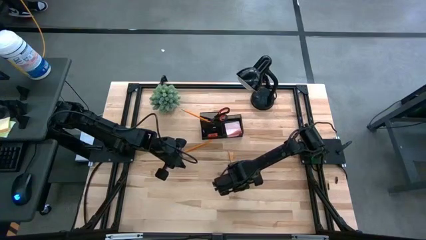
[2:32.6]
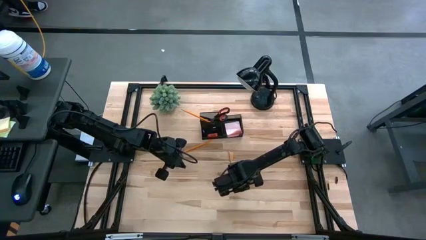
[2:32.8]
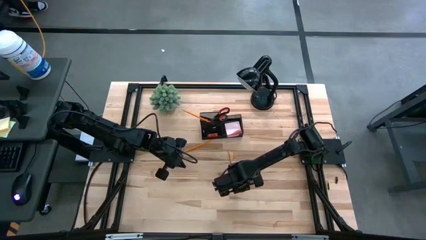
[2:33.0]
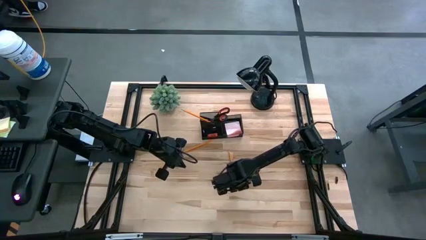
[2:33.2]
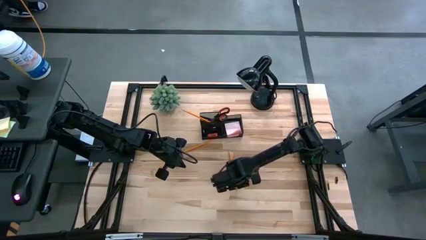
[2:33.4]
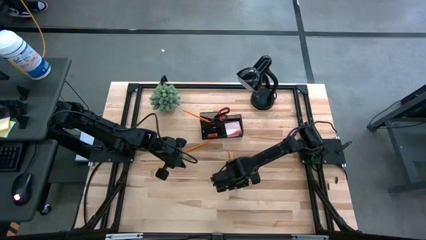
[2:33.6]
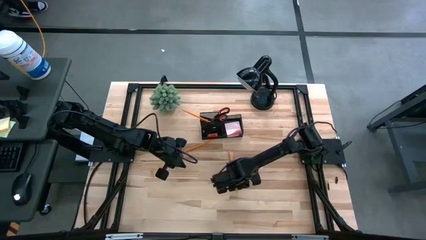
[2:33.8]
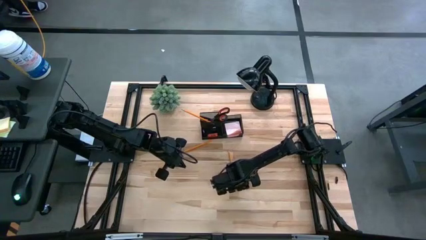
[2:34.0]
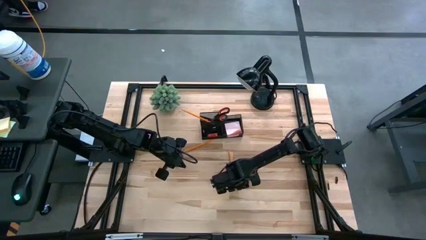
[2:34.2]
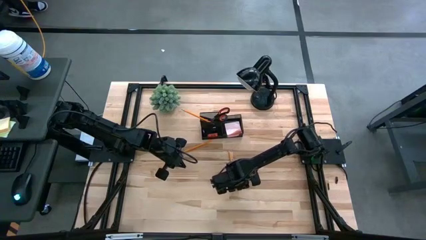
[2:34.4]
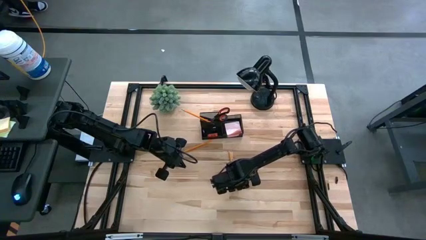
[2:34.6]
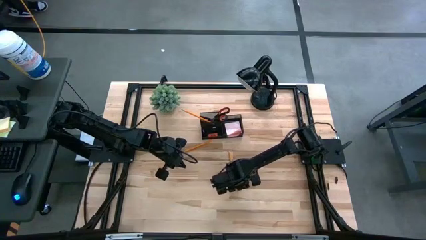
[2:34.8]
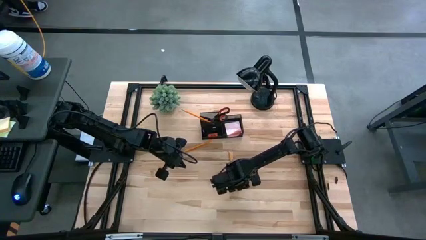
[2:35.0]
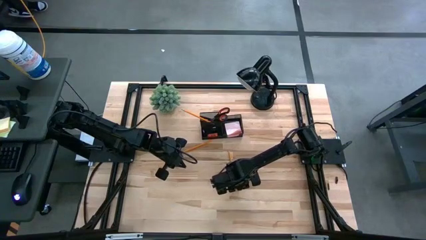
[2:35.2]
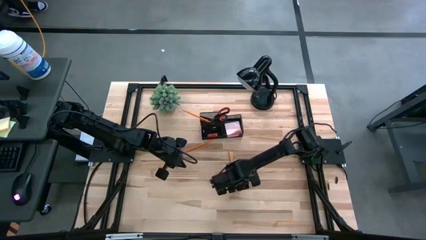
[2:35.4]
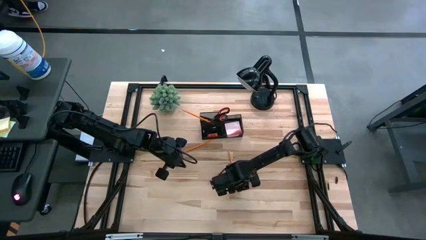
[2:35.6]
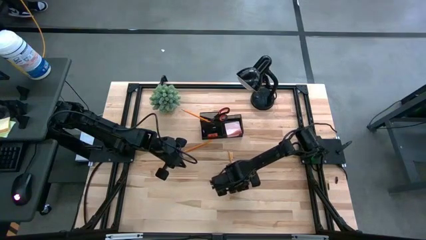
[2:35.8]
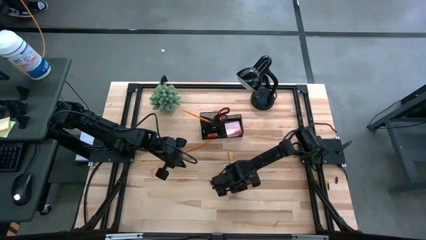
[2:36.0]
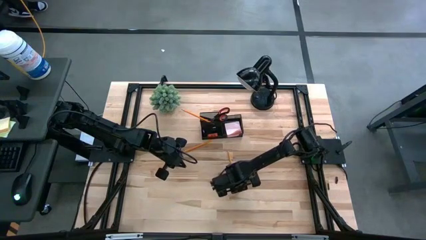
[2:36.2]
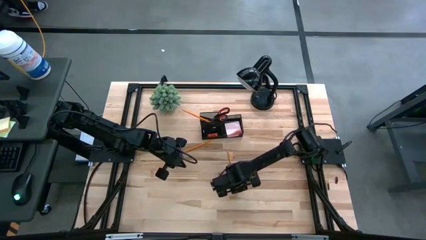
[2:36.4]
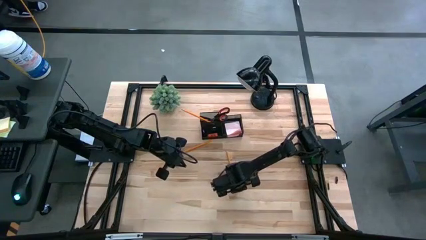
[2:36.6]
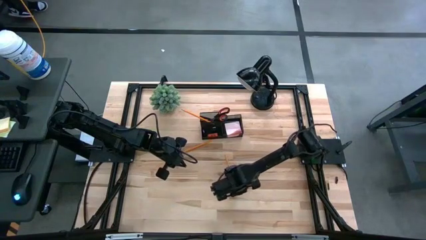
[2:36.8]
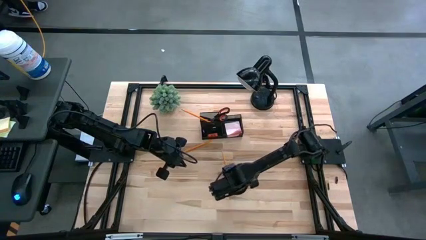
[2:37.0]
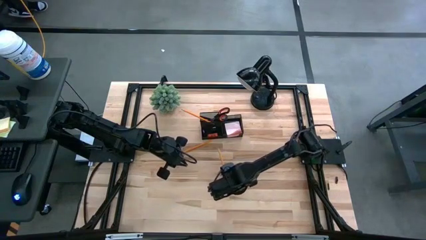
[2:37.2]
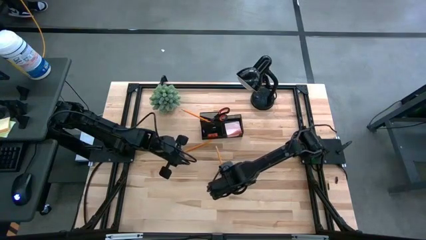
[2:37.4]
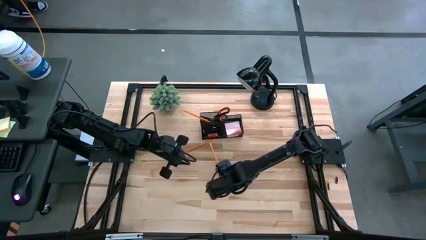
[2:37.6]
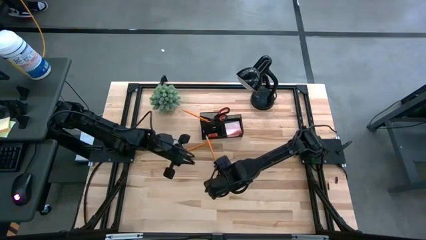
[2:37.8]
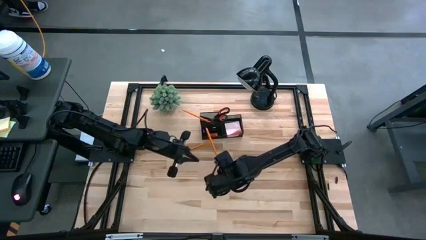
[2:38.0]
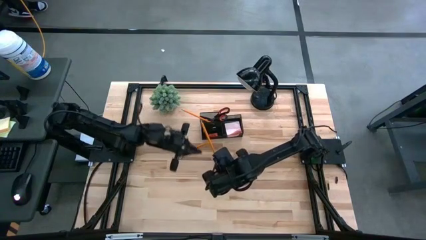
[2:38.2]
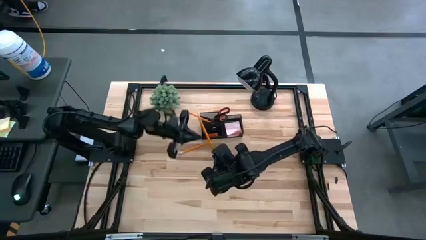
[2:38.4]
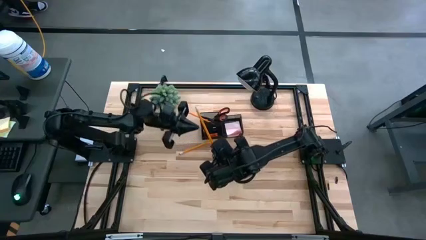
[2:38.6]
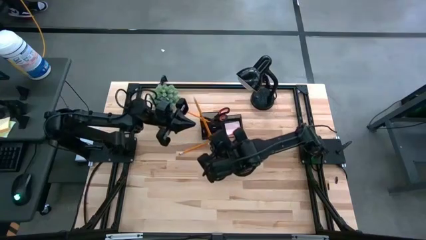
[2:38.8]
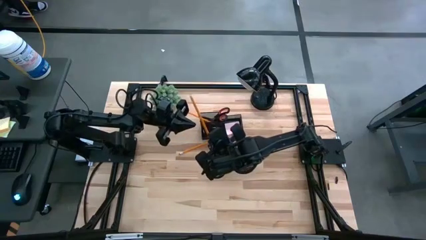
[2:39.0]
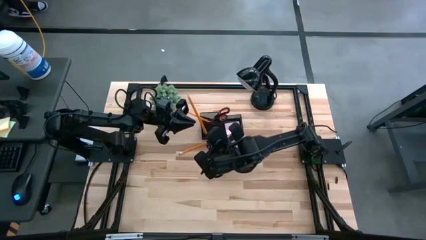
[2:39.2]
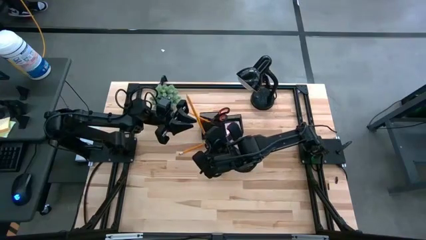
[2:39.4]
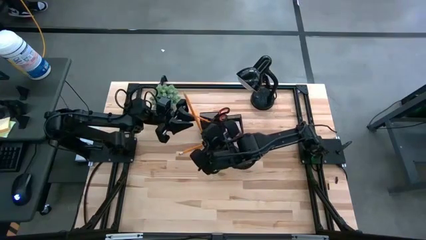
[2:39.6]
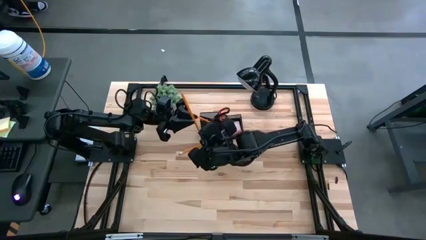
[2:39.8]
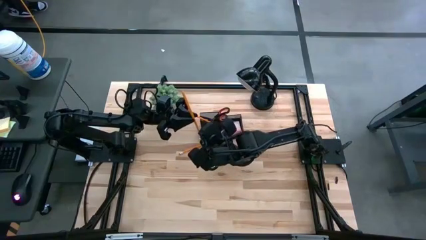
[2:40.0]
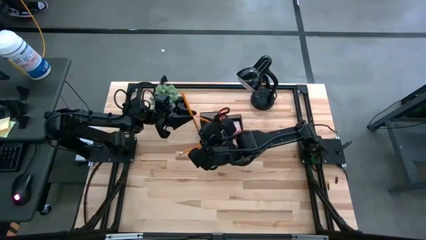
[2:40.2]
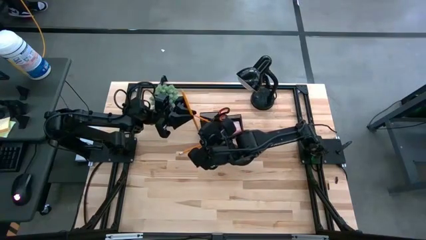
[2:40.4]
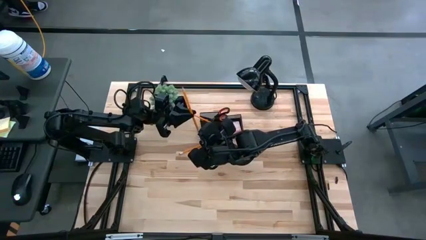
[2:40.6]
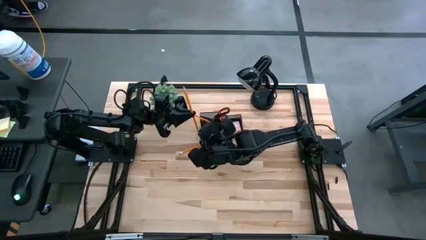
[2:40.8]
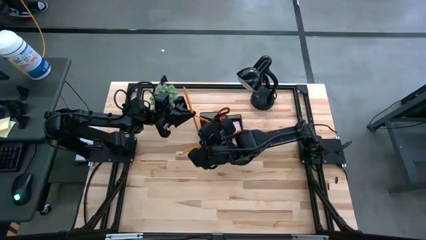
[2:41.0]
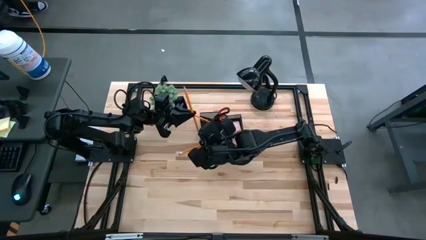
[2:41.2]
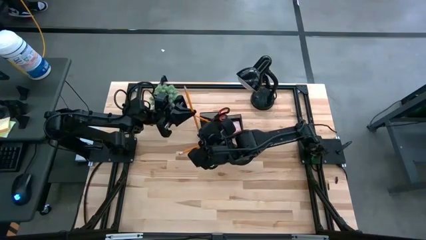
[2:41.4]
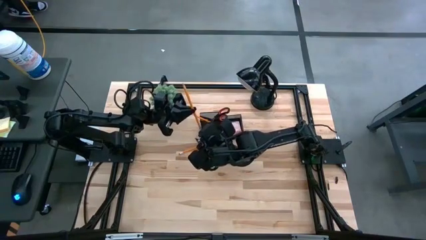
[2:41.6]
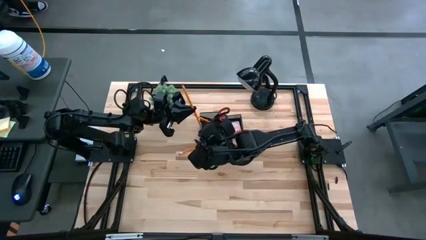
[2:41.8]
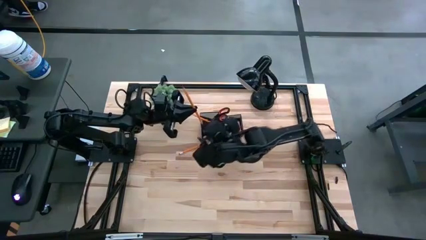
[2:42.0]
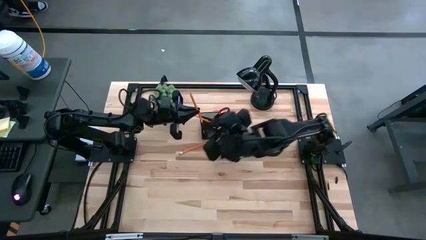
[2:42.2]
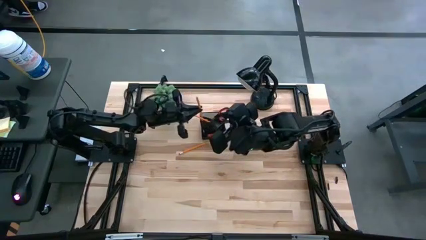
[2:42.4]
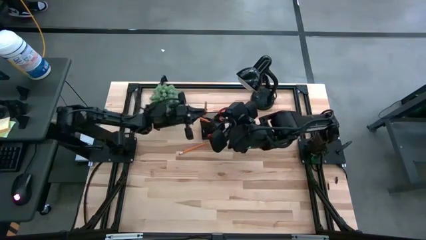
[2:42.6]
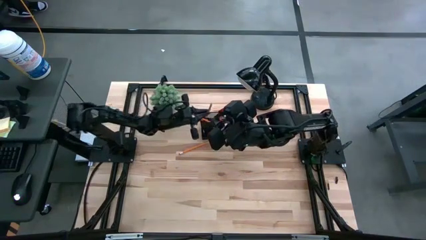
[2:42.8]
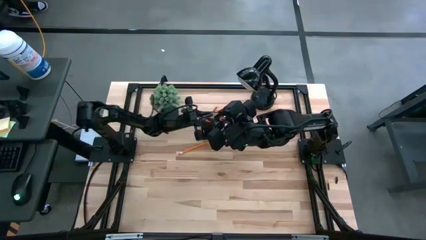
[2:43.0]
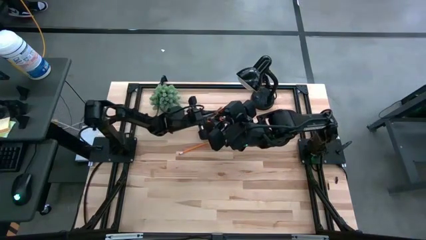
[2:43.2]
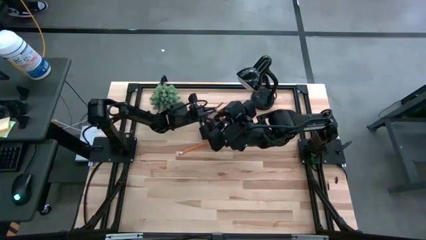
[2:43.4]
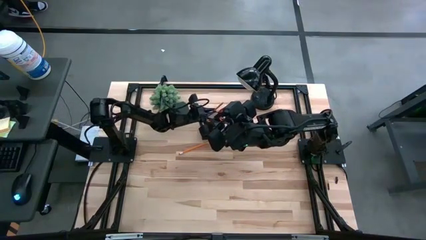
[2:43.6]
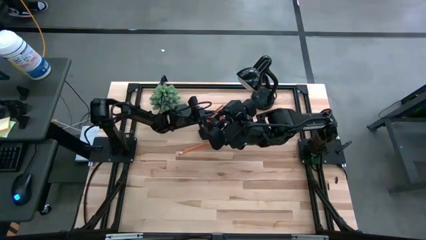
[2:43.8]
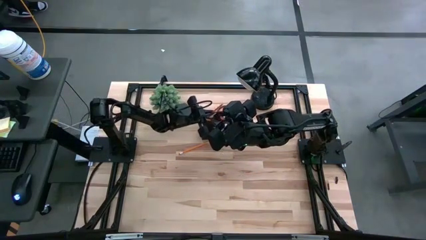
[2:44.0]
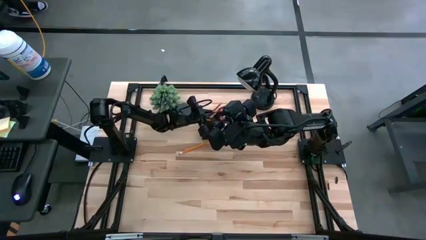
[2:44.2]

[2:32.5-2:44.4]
Task: Pick and place office supplies into organizer
Put the right pencil into the desk organizer

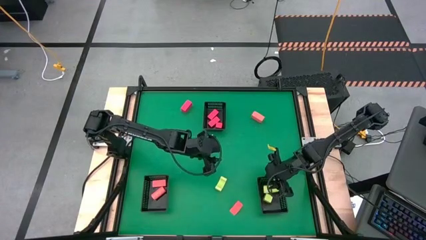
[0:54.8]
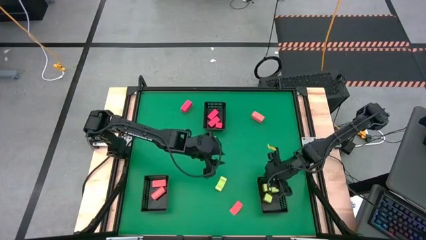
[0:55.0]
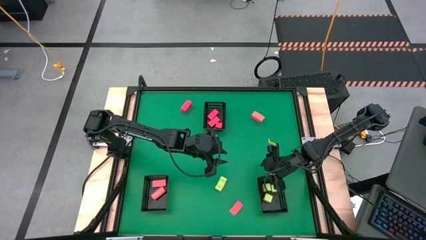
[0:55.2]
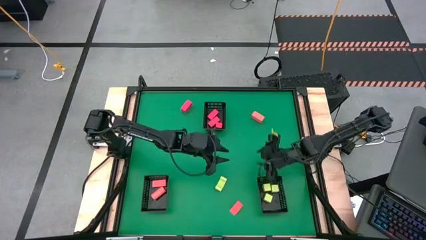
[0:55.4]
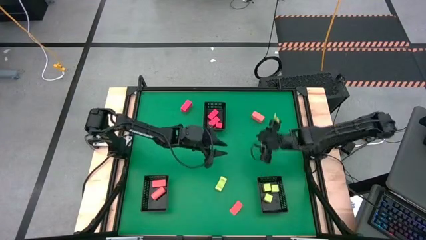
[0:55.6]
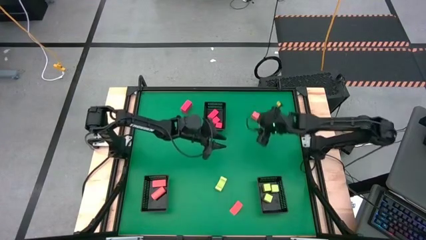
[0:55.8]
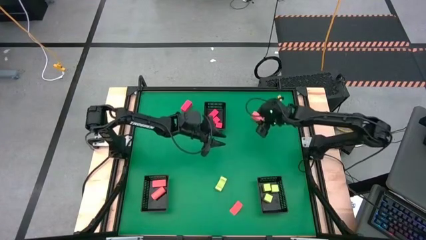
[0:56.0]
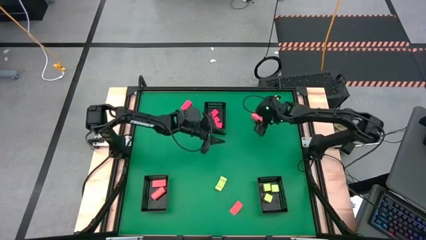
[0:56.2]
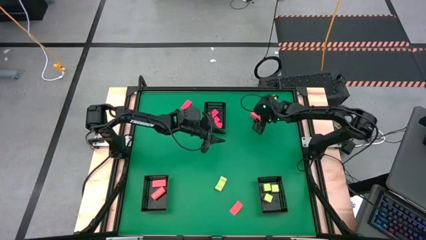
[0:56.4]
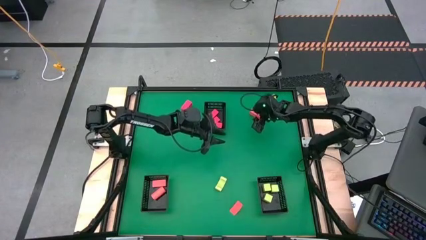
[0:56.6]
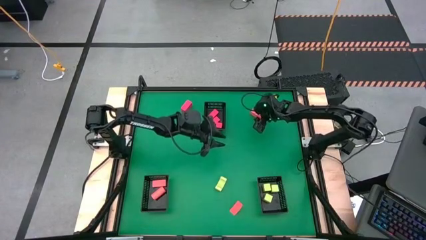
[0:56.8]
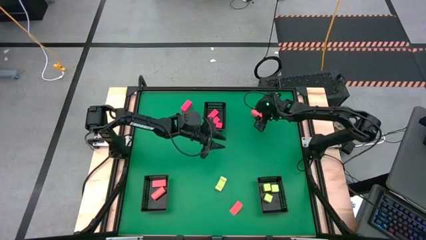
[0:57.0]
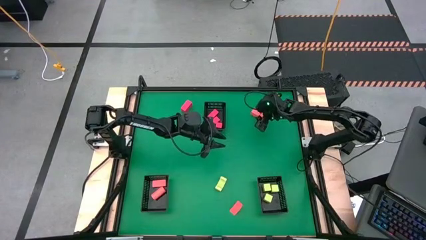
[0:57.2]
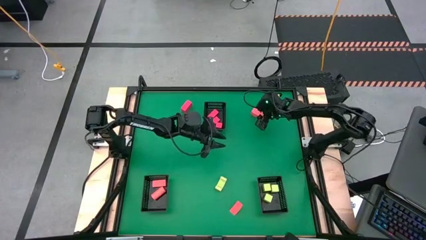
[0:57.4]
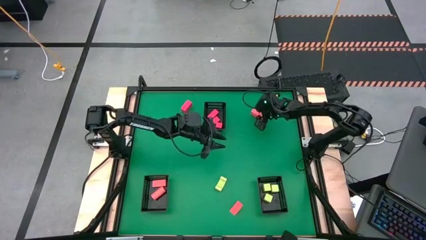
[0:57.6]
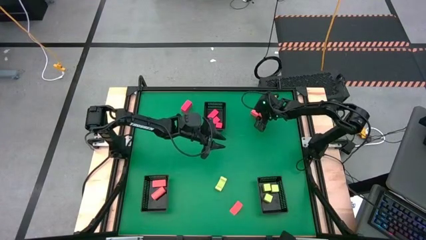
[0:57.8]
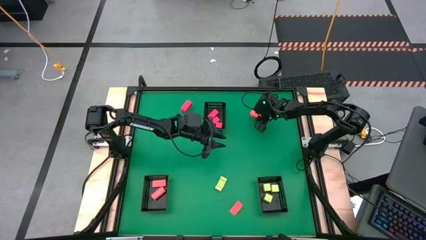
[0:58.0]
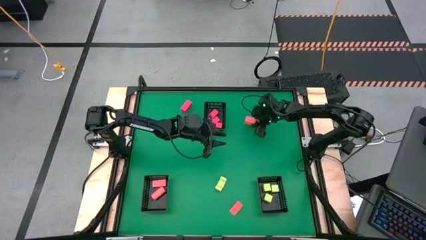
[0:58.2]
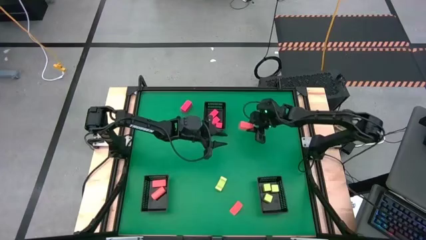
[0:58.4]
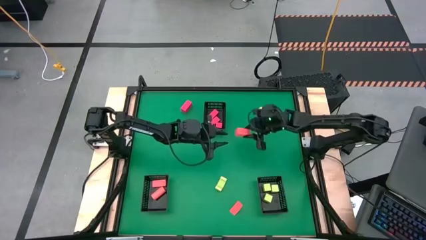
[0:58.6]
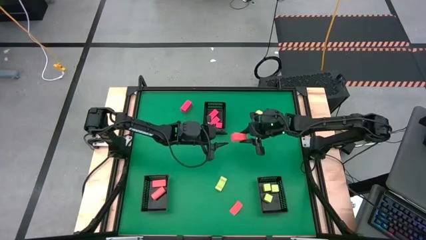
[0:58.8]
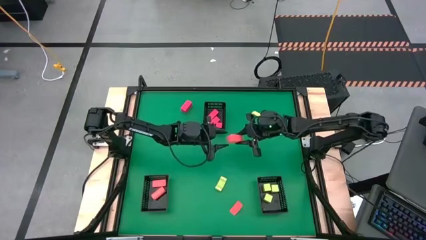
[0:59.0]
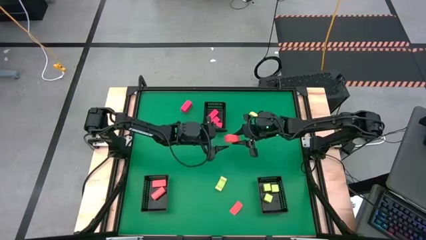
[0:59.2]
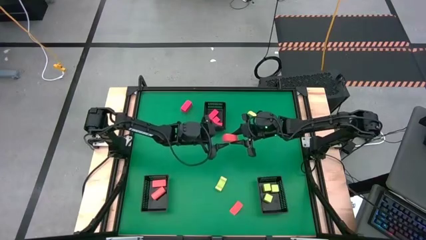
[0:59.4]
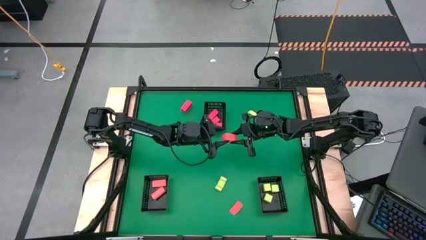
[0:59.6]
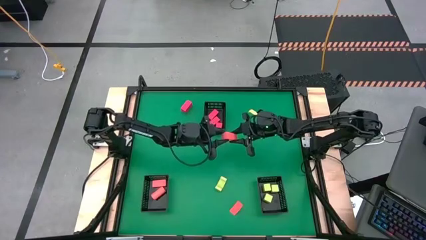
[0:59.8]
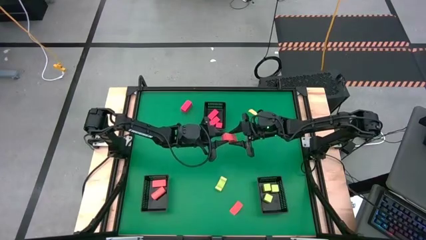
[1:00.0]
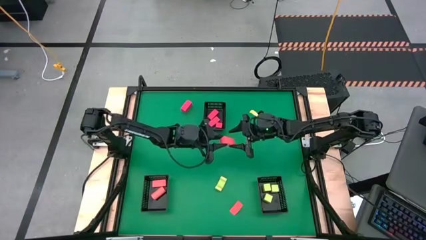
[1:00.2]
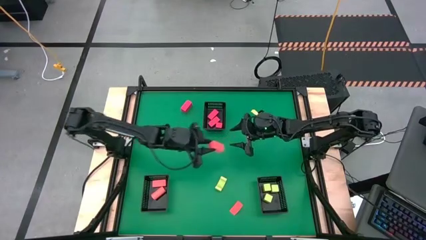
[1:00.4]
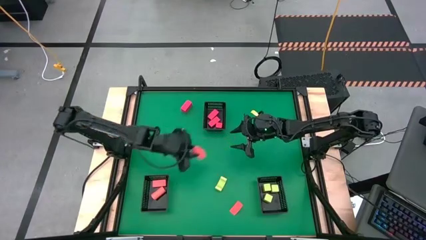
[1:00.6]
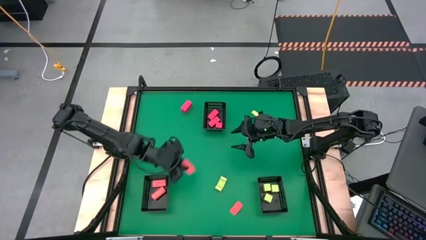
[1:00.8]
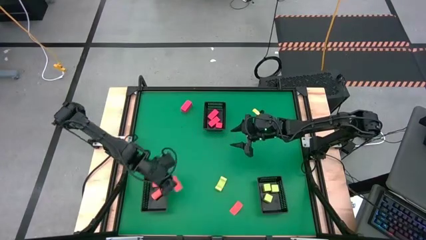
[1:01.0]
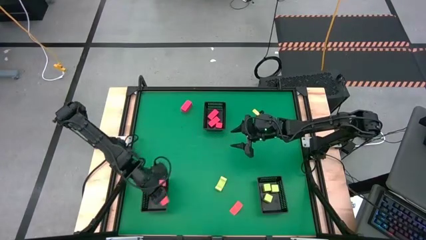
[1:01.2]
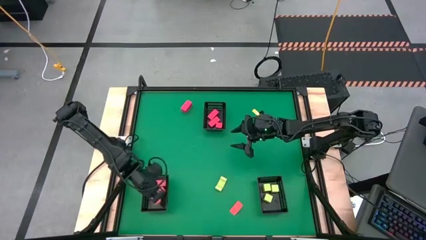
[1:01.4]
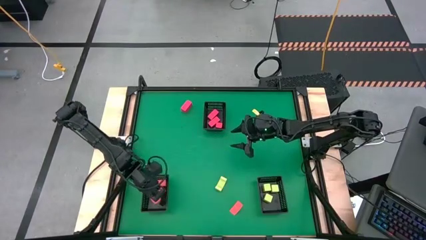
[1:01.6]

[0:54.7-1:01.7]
Task: Sort & place blocks by color
Put the orange block into the bottom left black bin
